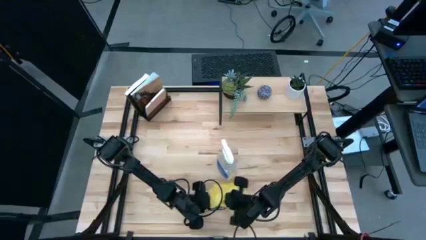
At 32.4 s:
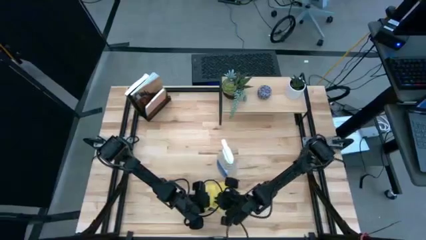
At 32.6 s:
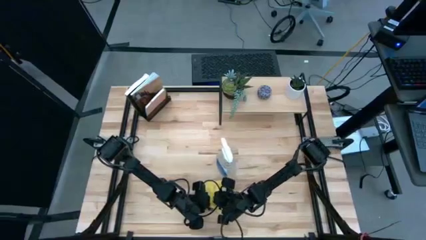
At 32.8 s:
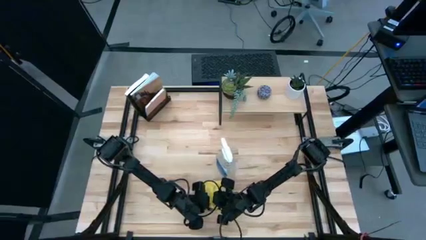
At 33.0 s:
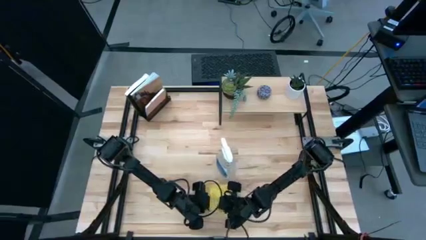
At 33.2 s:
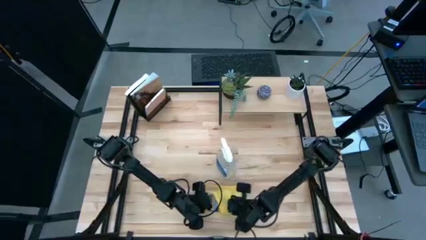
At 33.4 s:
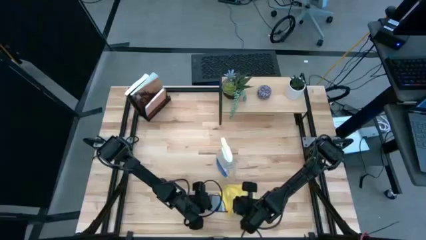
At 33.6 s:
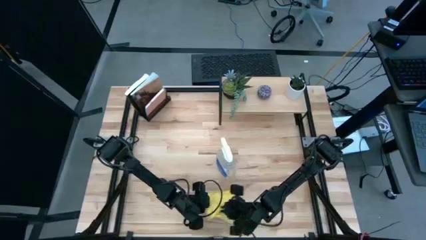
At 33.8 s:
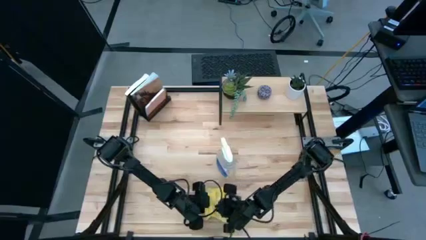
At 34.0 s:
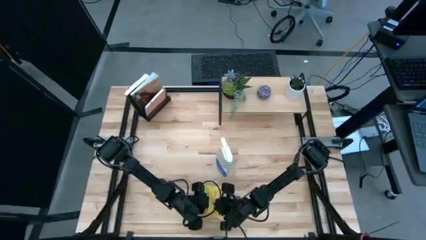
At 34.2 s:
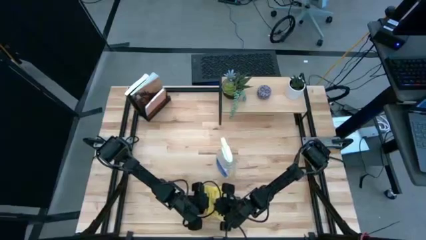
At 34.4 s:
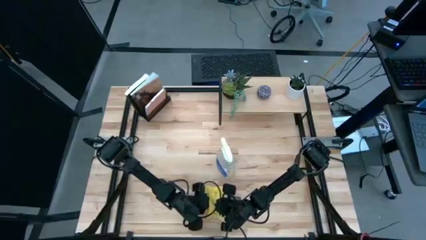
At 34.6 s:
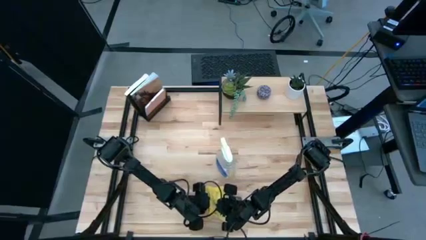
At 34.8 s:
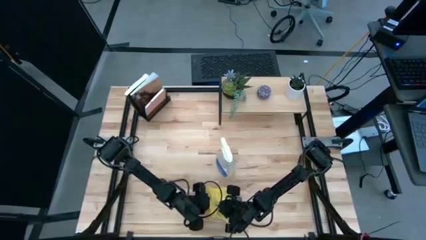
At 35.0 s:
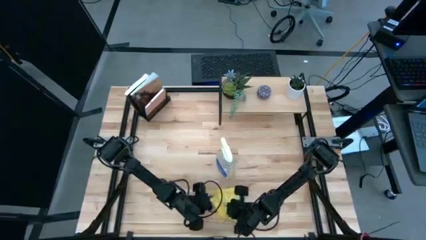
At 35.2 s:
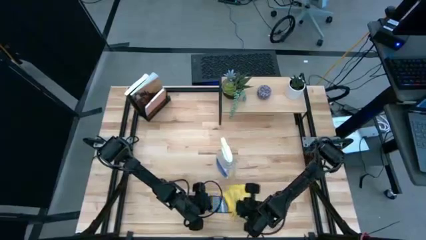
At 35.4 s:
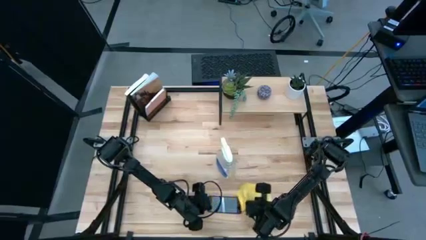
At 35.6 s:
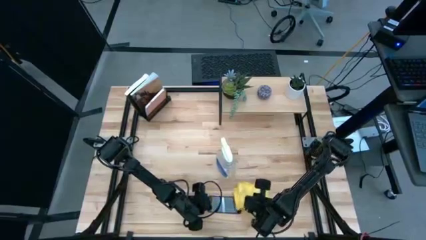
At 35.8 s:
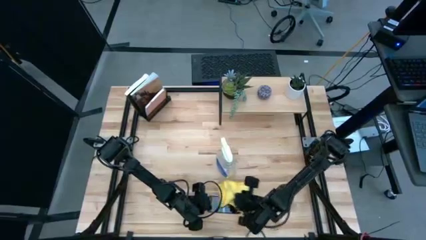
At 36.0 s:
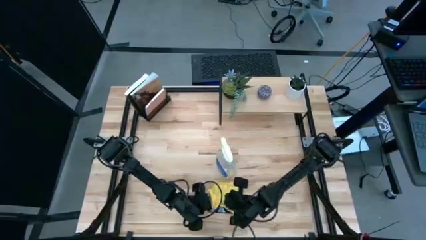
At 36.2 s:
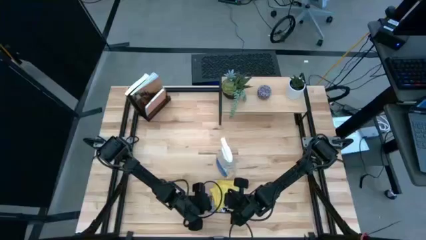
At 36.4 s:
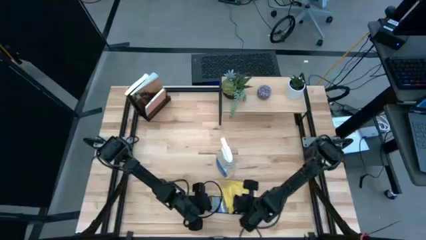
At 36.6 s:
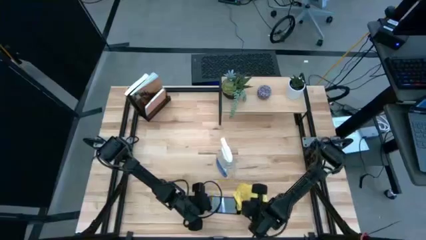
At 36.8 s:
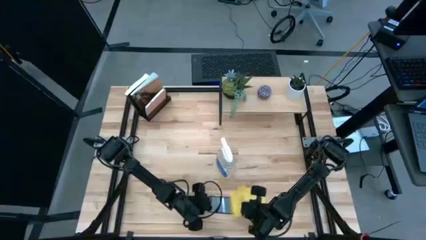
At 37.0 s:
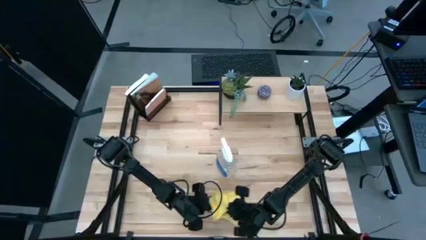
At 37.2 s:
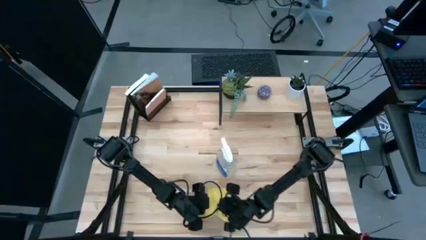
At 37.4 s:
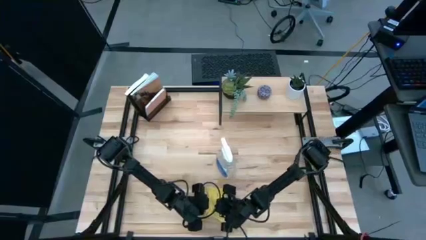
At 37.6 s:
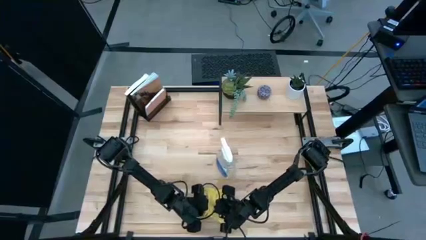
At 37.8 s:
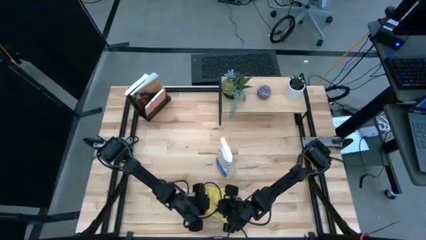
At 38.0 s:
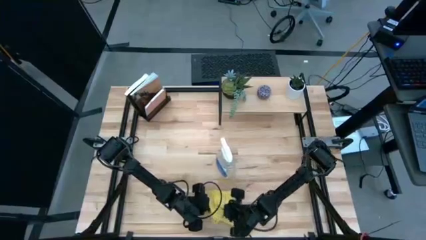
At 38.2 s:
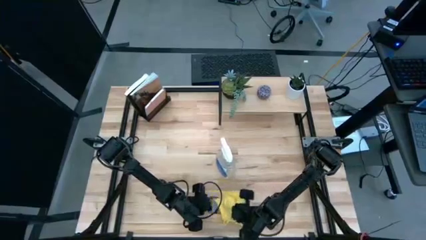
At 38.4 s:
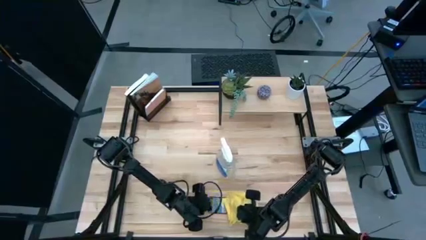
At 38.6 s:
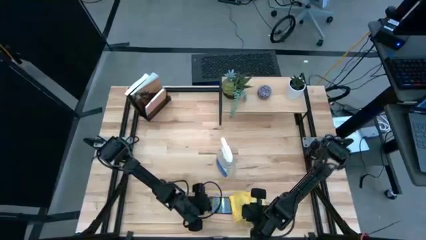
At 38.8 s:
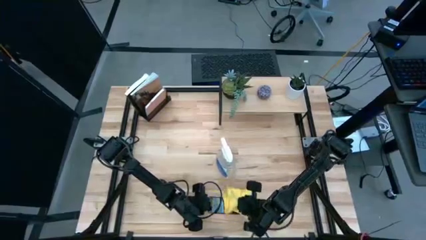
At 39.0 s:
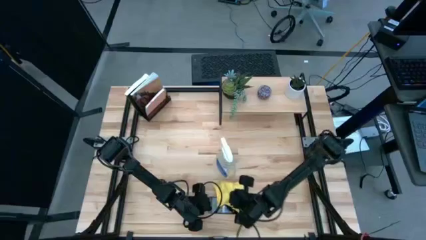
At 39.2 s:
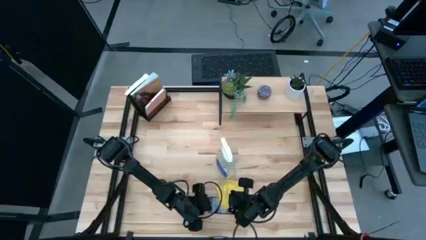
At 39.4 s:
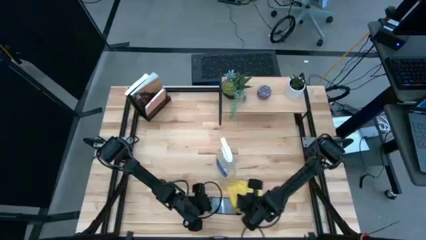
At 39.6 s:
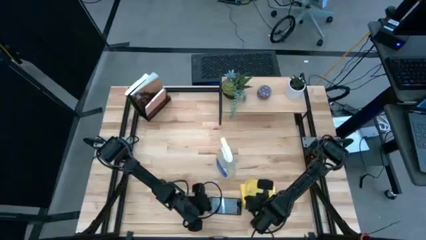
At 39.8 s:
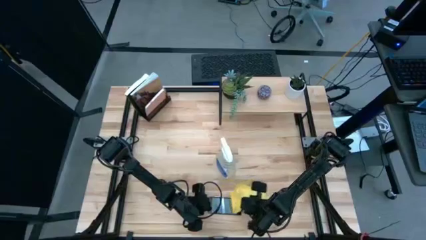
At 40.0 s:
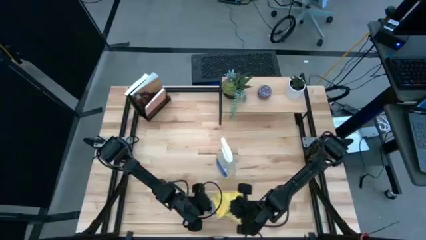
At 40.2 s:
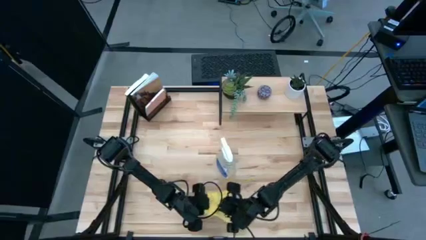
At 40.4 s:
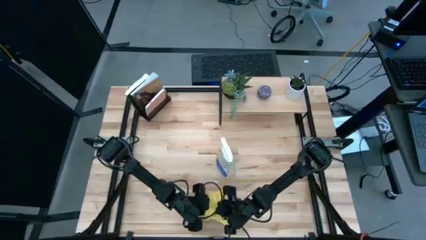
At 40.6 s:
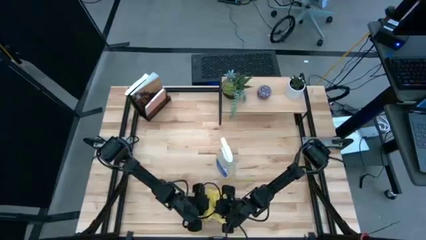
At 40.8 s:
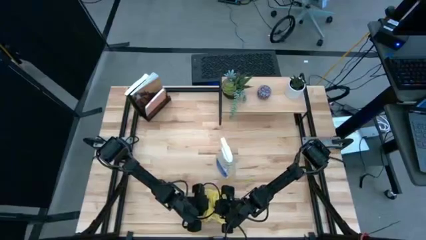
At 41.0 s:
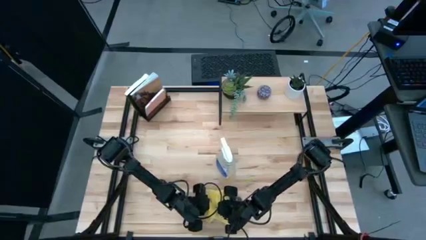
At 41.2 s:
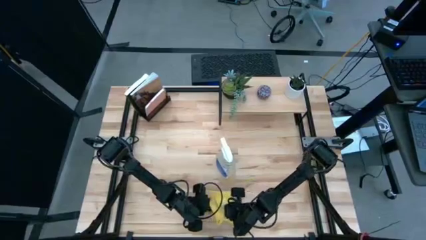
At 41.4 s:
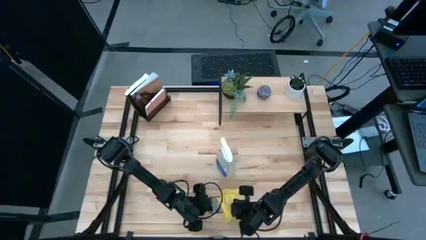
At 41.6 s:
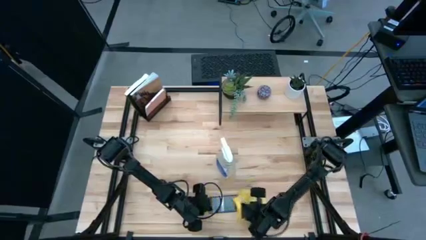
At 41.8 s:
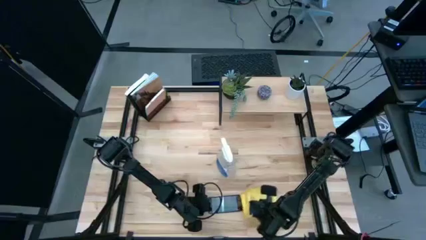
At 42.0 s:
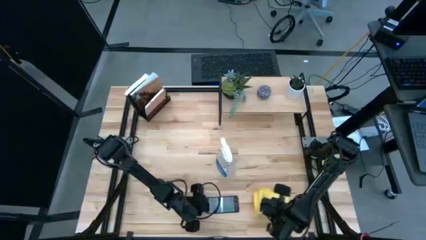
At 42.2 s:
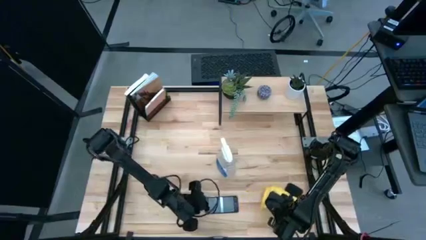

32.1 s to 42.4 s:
Task: Apply microfiber cloth
Wipe the front of the cellphone with the microfiber cloth

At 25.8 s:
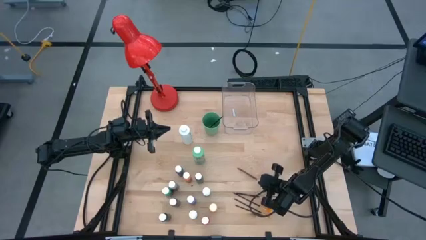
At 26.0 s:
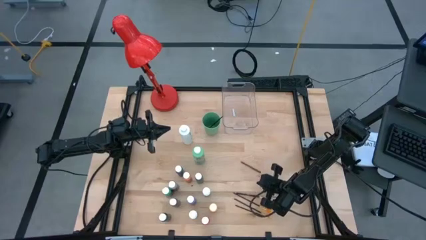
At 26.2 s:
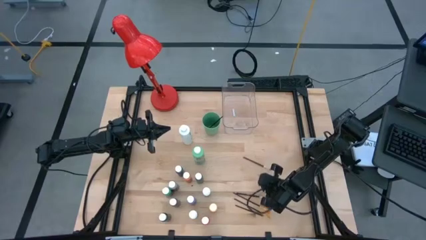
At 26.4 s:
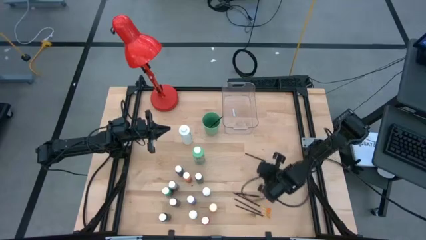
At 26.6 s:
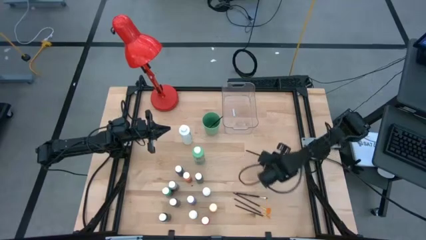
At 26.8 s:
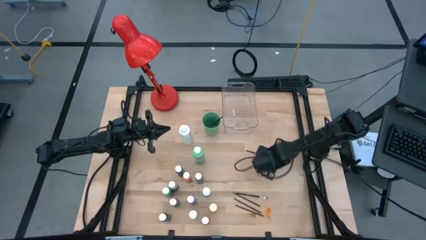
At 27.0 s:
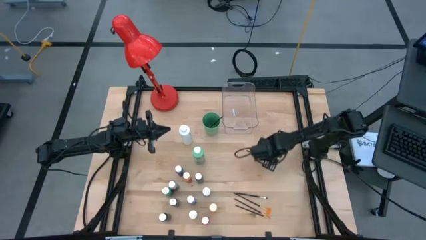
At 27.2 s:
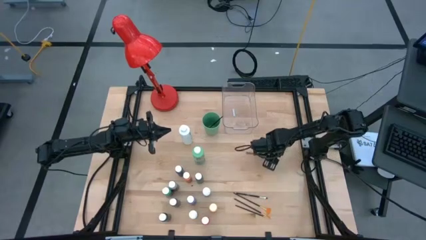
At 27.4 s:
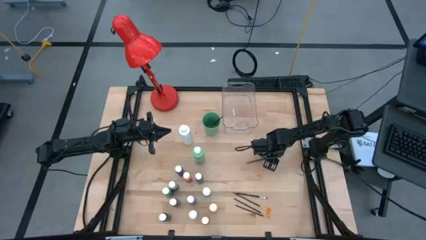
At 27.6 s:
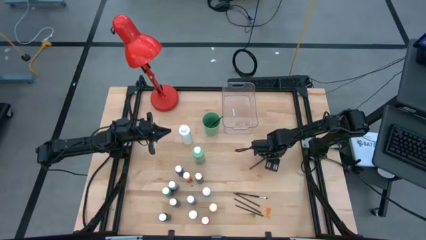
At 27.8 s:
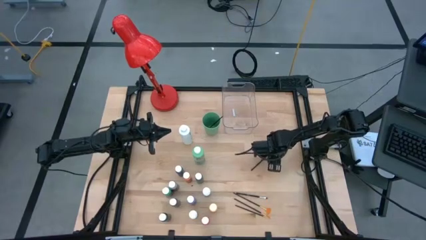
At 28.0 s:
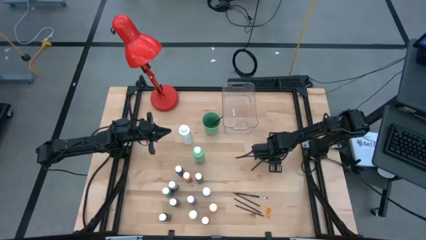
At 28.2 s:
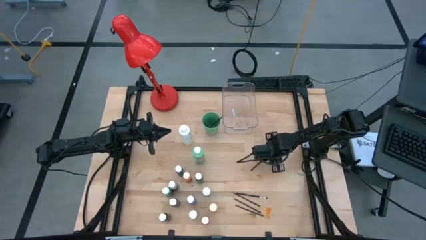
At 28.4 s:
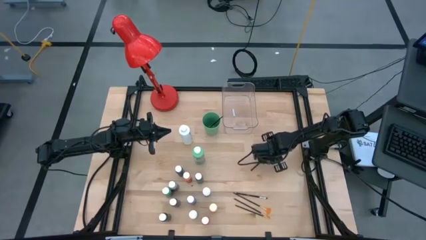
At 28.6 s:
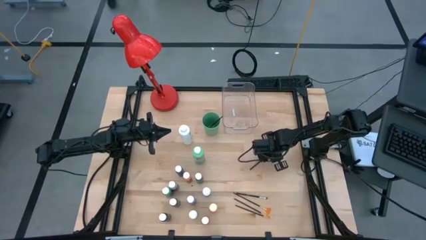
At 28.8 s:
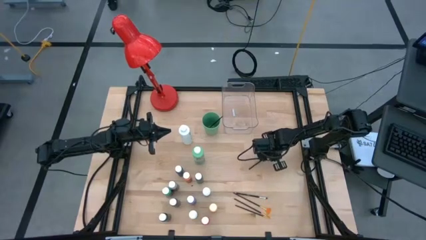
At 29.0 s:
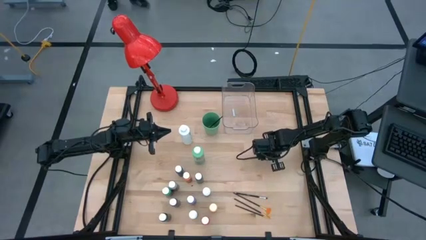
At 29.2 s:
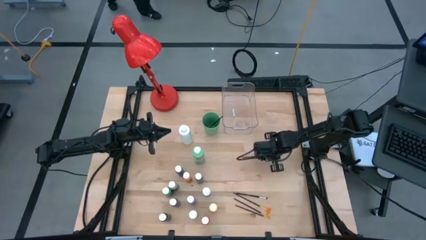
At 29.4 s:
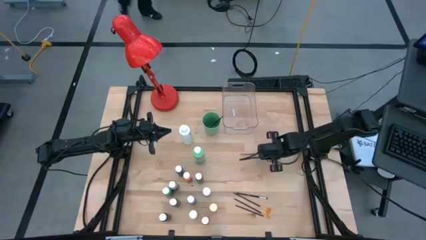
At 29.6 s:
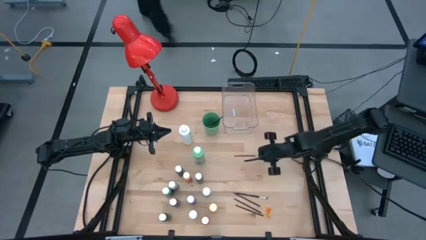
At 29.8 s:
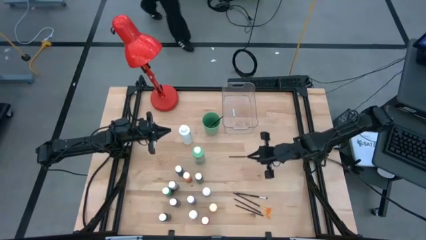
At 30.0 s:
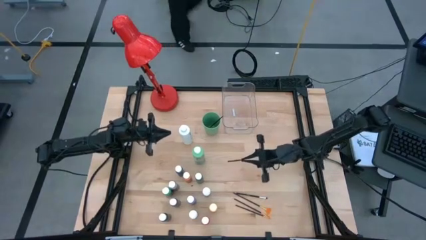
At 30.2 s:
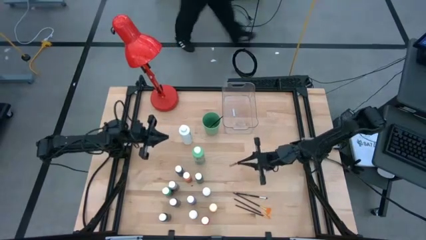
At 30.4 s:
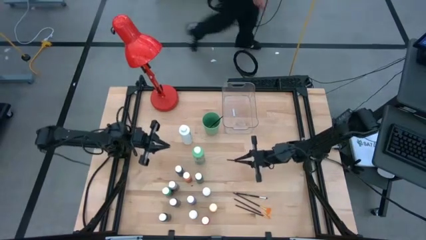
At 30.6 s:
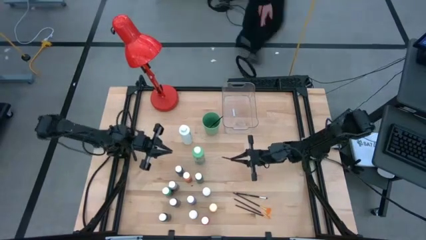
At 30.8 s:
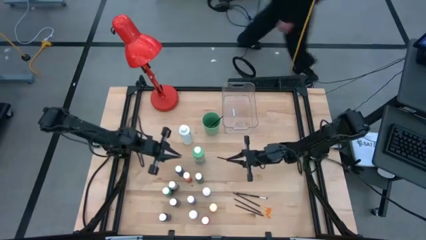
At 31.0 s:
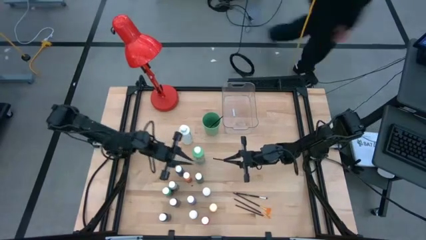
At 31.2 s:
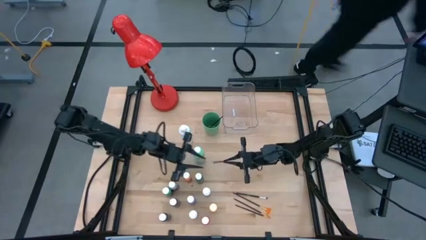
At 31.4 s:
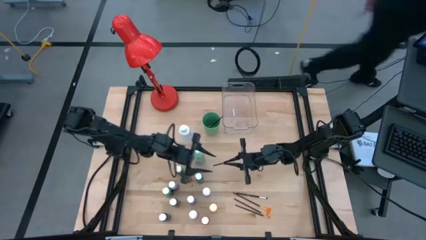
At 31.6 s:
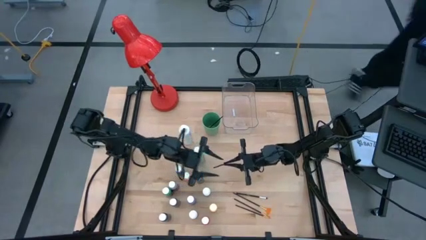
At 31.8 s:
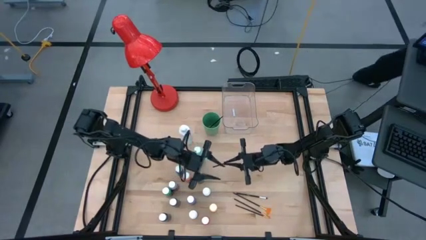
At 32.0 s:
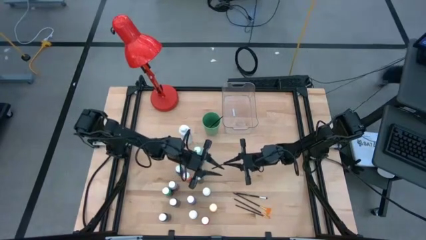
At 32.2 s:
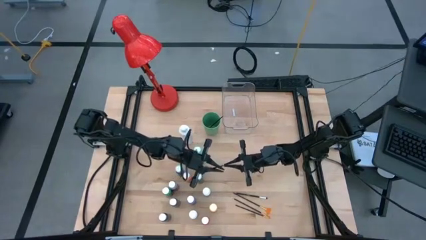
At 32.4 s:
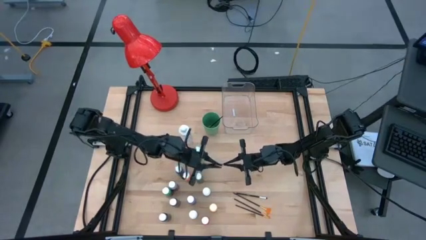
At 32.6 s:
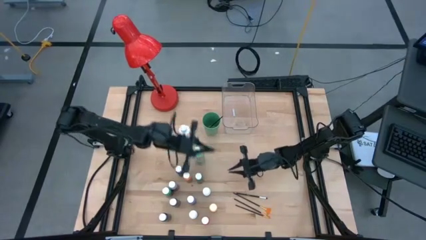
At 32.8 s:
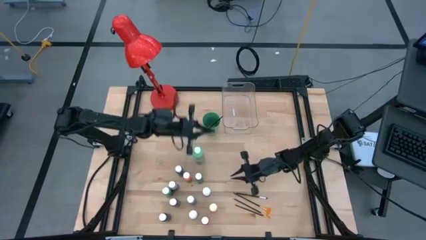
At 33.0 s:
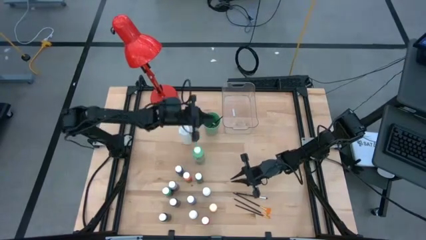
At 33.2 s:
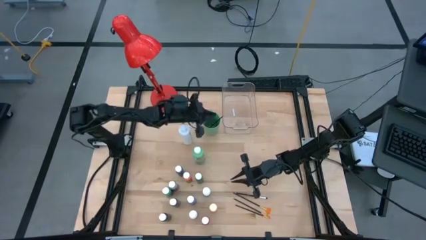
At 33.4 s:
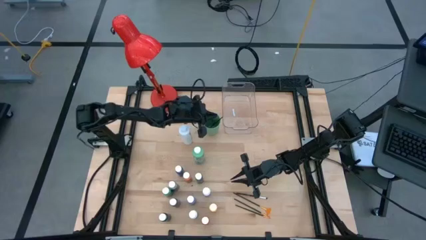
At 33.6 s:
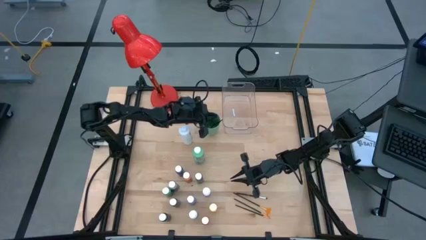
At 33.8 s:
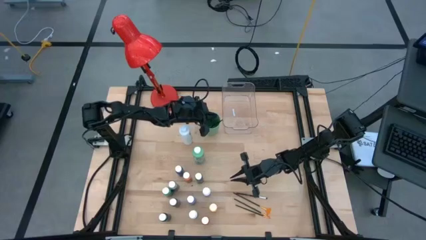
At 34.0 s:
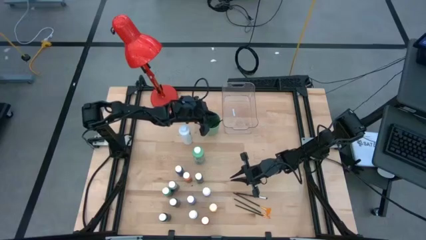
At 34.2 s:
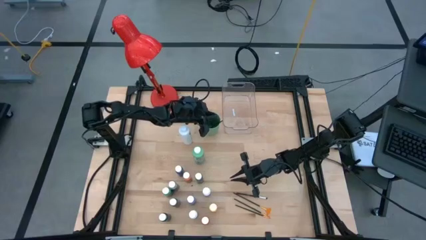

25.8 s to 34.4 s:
Task: Pick & Place Paint Supplies
Put the silver paint brush into the green cup
